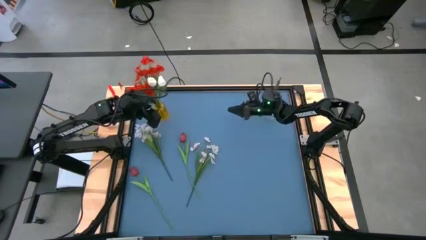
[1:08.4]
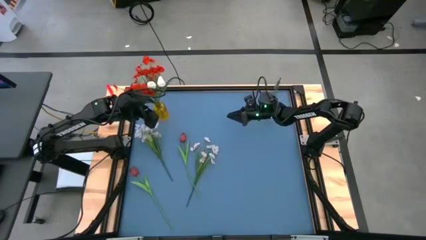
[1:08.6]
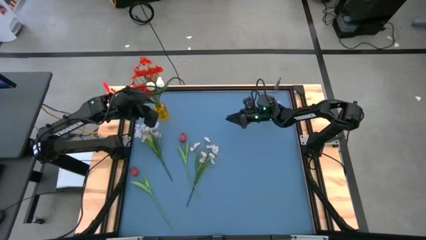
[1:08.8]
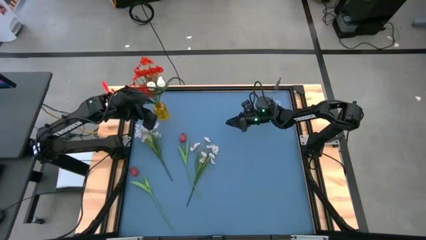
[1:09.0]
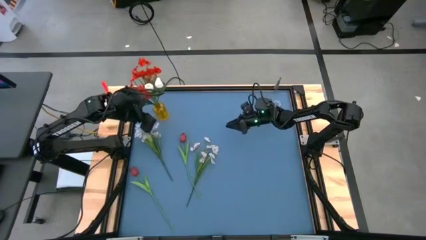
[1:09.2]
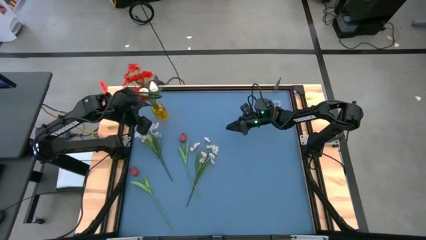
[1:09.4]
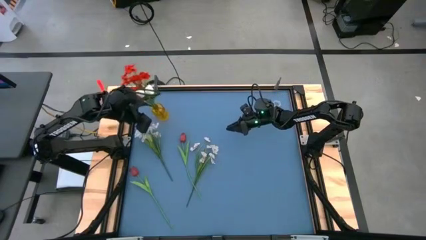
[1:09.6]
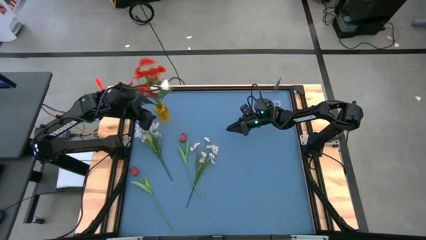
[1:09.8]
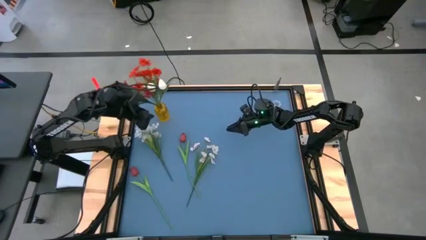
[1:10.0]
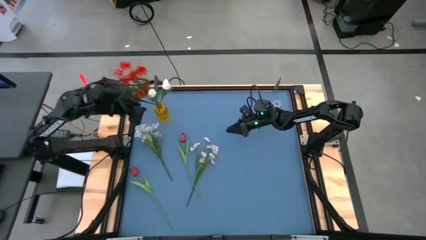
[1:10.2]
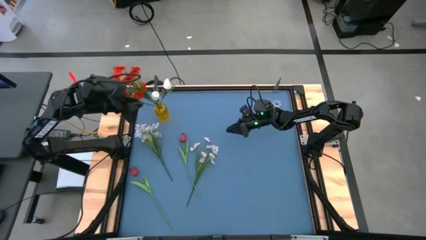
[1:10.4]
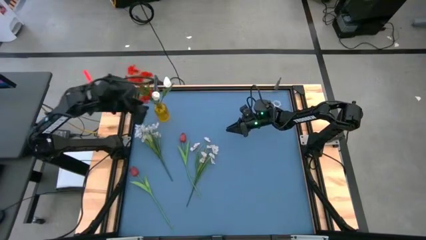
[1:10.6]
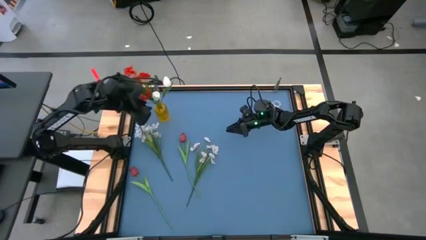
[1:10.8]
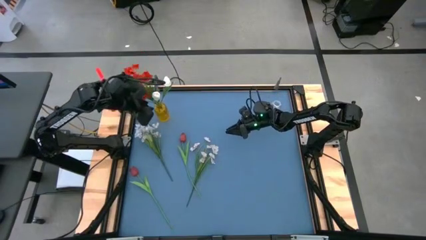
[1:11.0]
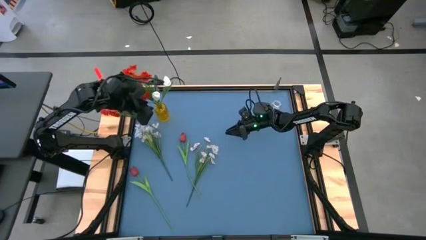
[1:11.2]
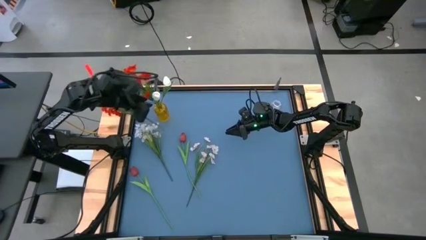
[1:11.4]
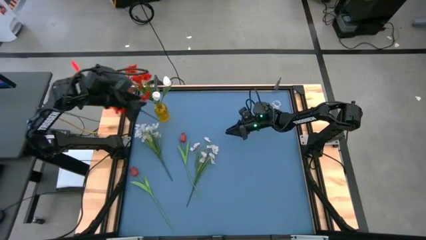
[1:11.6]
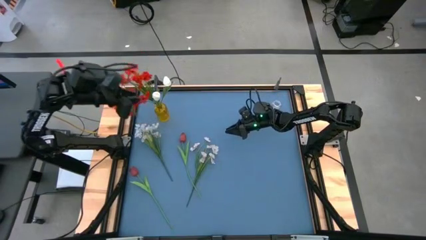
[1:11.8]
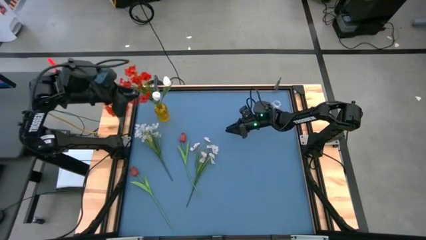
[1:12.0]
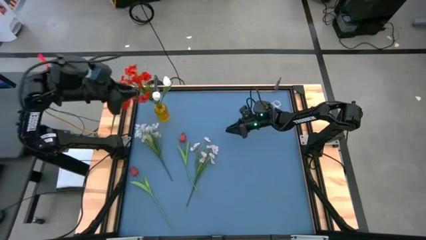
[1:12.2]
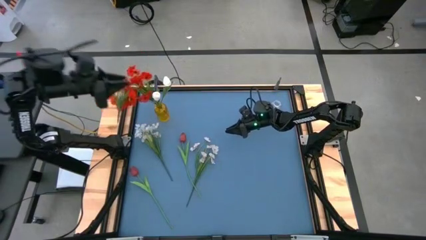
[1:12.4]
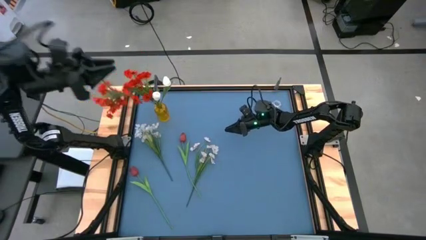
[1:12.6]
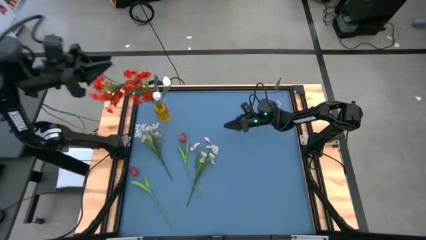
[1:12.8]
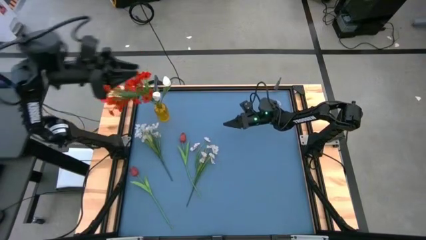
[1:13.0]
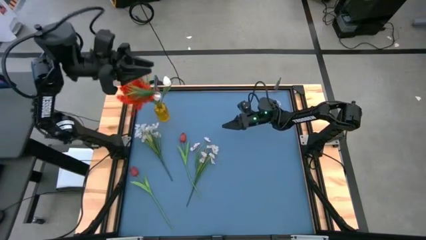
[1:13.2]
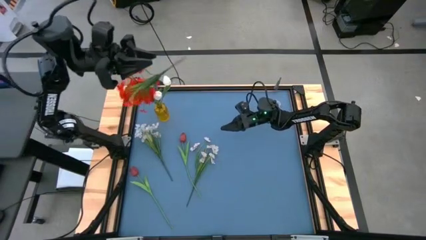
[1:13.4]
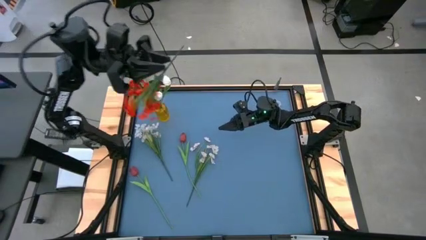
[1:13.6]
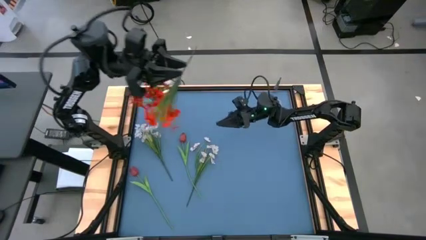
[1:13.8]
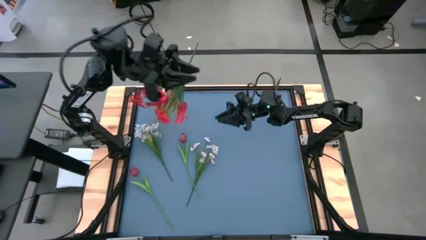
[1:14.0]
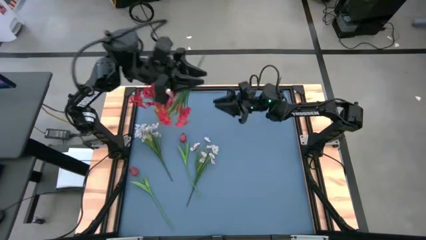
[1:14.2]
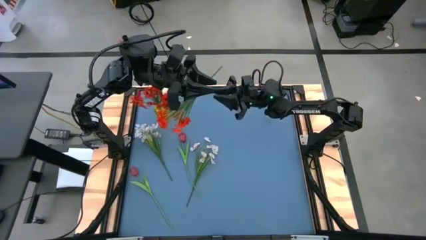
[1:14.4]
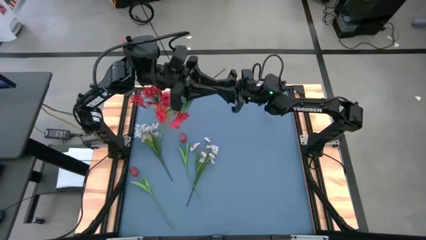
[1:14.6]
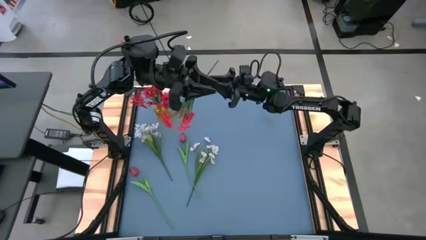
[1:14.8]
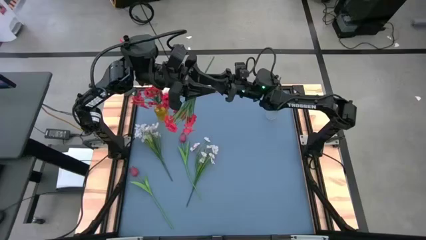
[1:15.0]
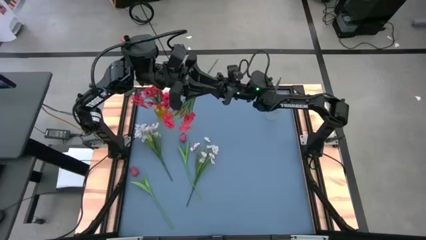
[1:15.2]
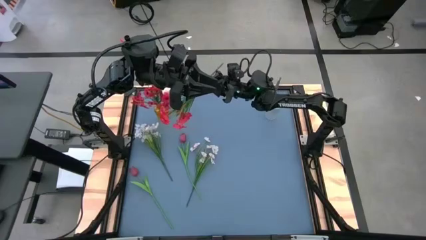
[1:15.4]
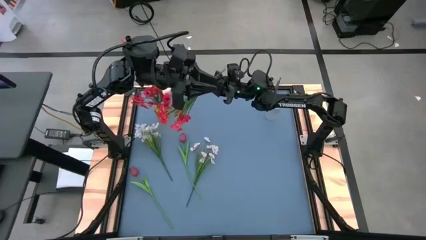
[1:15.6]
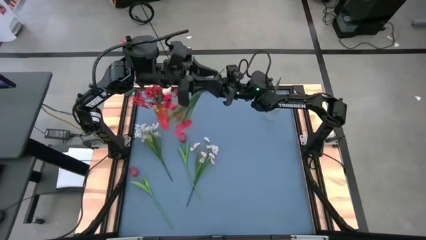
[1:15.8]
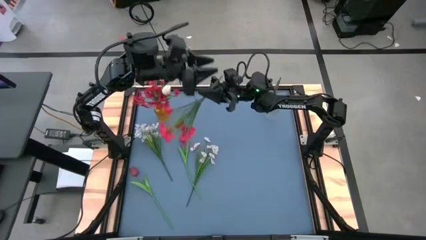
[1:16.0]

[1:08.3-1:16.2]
Task: Sort flowers into vase by color
Put the red flowers into the yellow transparent flower vase

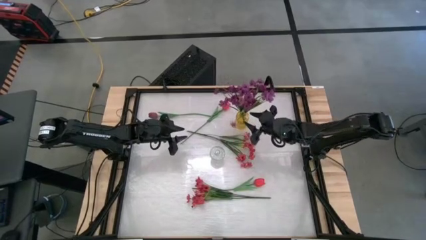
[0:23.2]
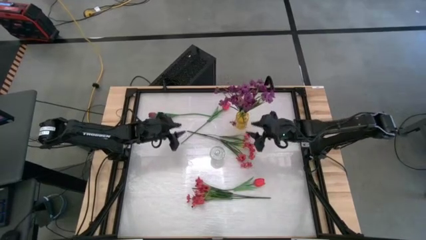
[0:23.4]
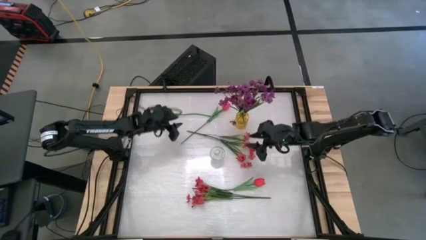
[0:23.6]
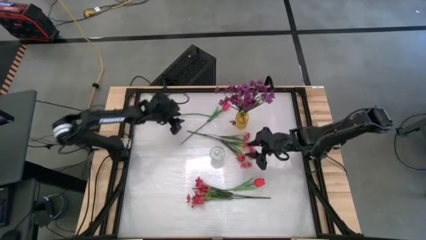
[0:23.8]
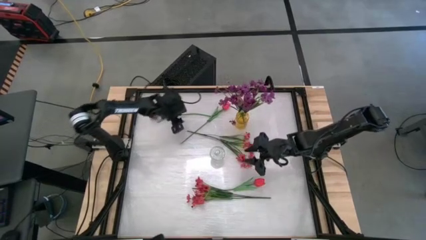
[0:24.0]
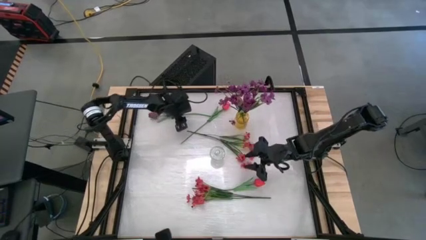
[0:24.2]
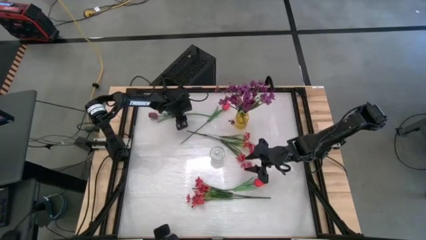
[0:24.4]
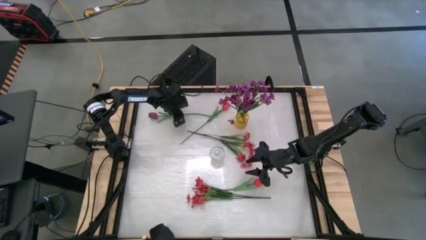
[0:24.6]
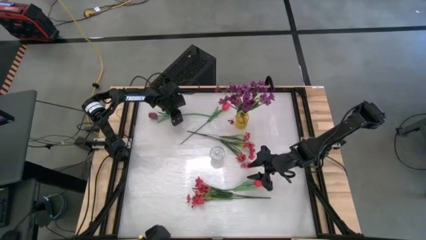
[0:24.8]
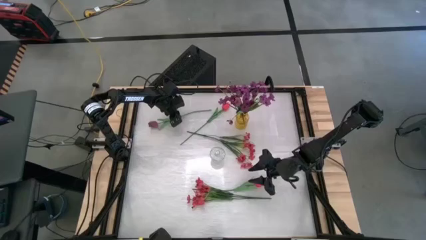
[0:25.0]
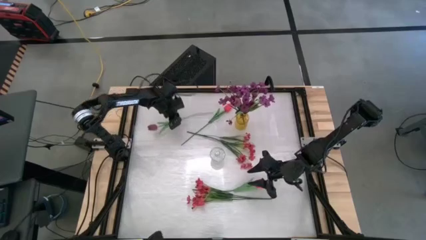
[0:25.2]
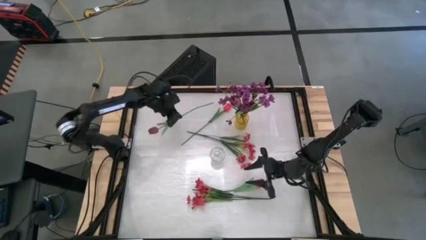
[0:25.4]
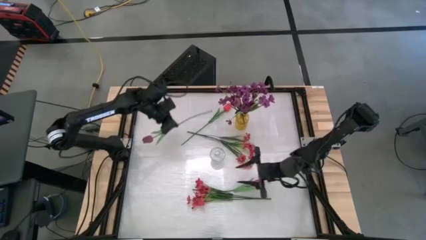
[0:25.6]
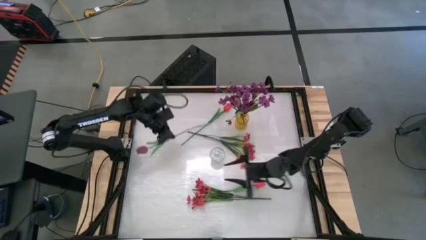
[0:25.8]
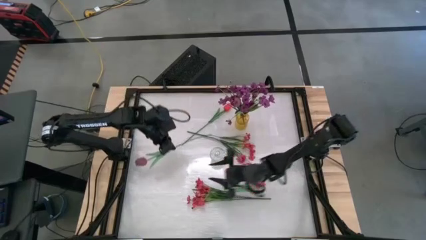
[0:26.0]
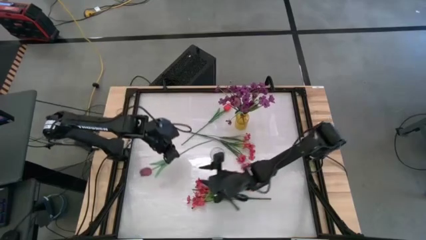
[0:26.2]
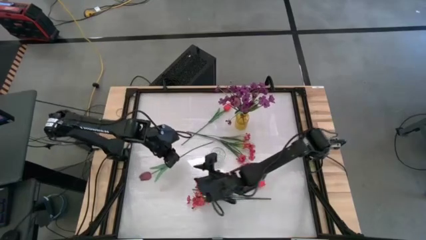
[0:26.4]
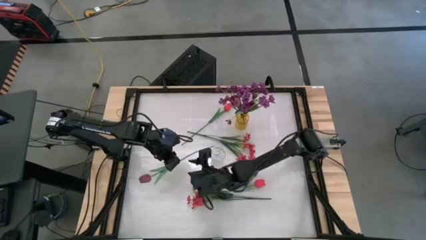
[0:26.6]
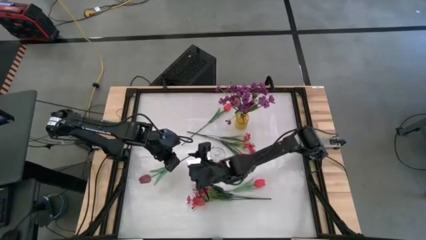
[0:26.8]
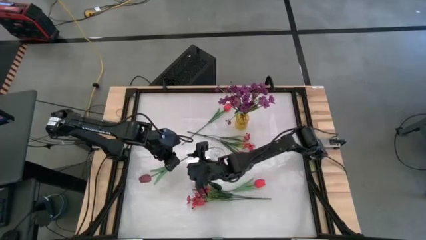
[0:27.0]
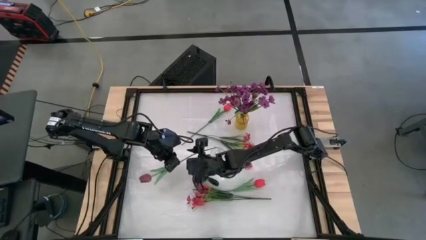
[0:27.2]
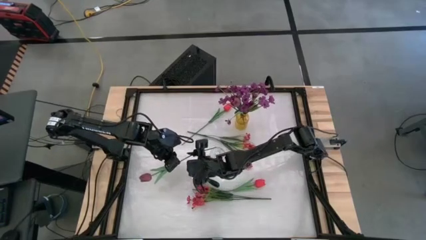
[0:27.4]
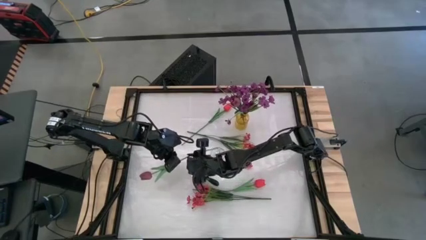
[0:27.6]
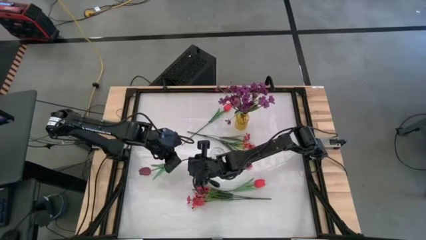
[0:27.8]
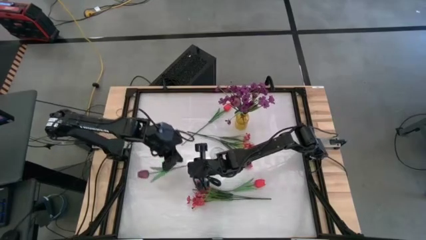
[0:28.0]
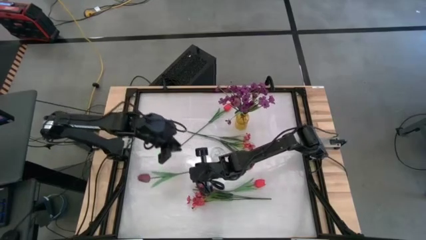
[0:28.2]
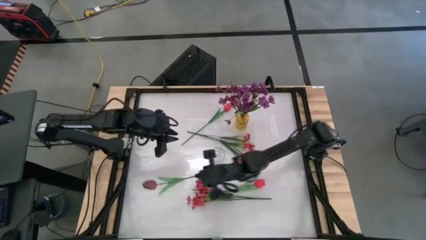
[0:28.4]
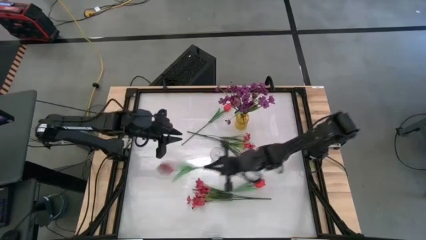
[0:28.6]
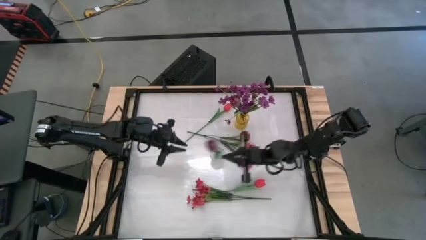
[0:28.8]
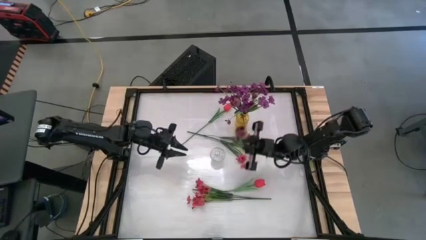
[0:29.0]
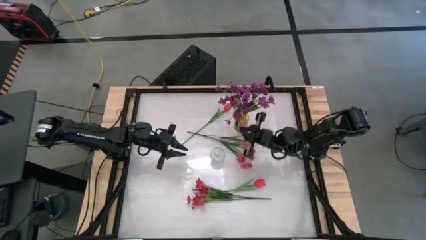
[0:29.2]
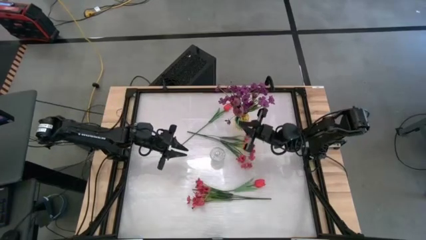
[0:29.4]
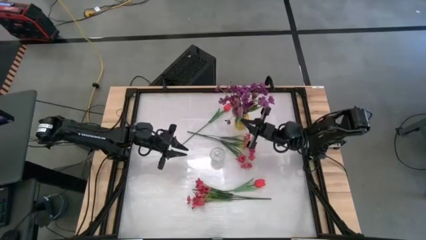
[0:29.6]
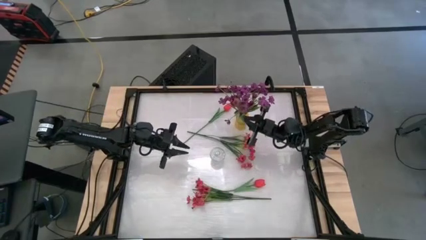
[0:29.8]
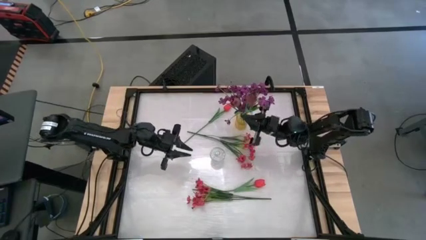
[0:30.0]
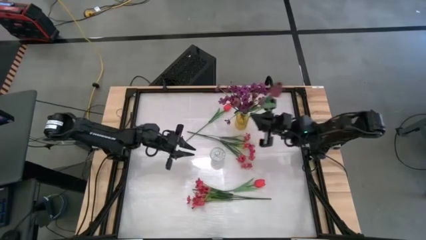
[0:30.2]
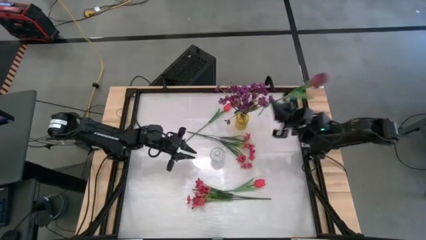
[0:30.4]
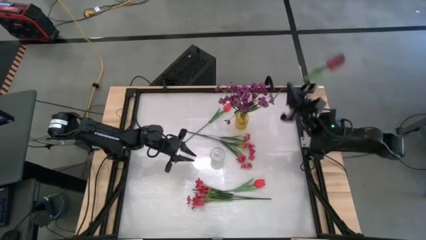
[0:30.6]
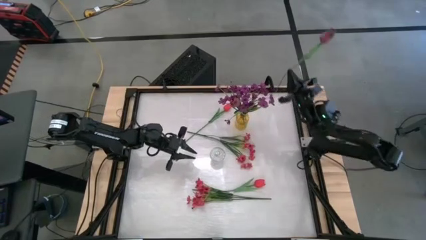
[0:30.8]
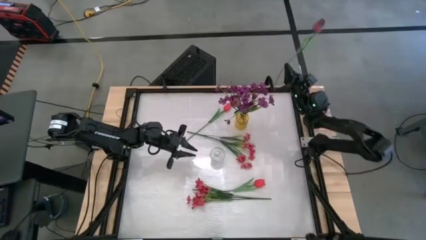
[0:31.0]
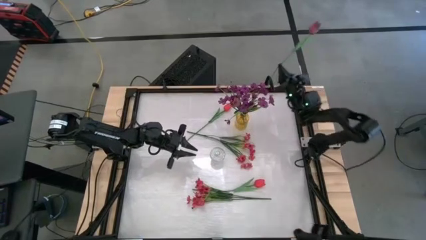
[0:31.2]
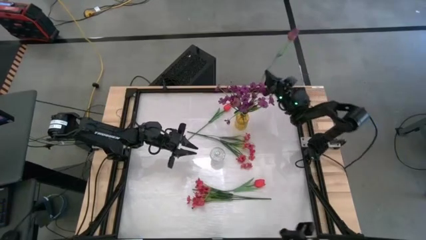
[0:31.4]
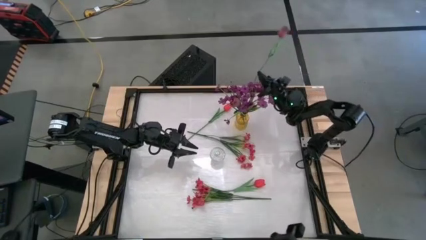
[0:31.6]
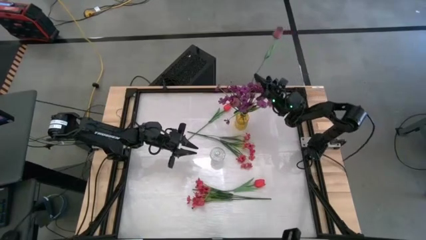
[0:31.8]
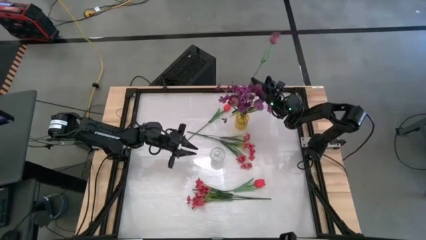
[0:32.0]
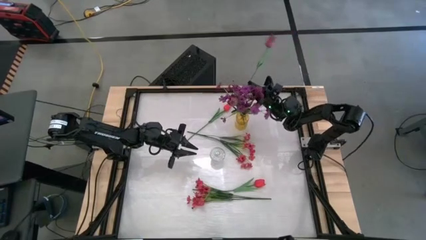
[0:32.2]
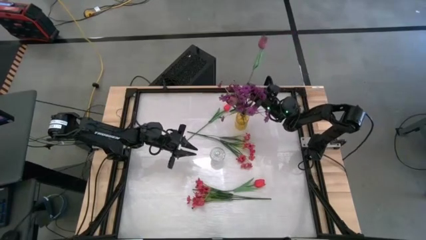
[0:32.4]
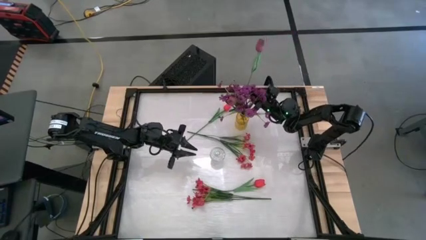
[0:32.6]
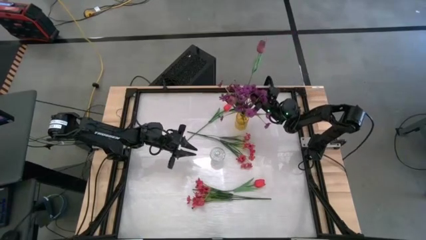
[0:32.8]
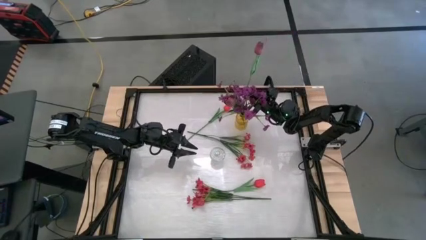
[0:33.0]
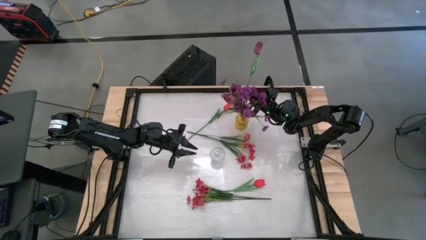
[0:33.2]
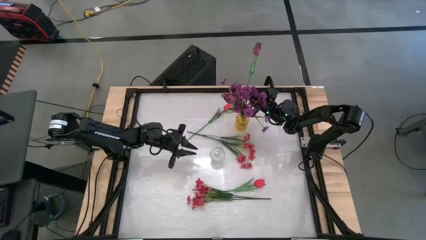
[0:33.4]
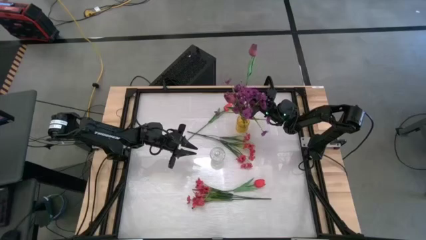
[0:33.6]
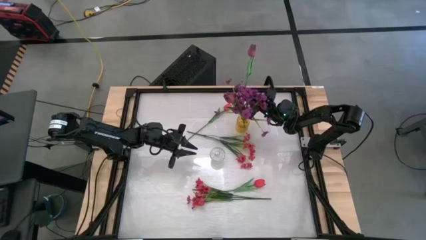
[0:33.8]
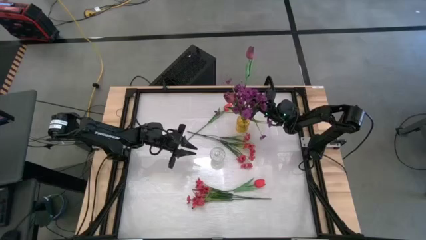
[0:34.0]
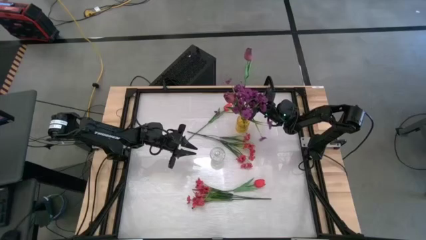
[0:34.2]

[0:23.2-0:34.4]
Task: Sort flowers into vase by color
Put the purple flower into the yellow vase
